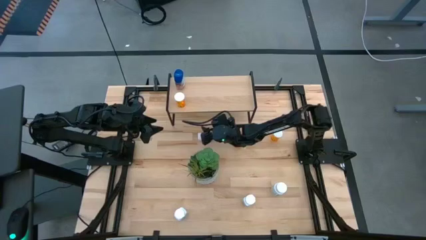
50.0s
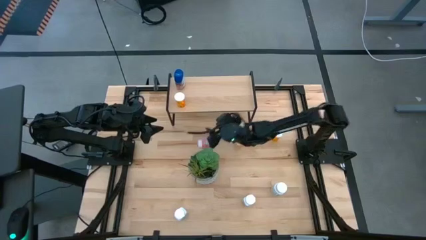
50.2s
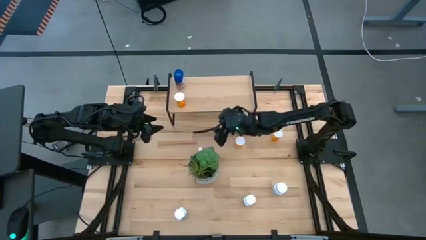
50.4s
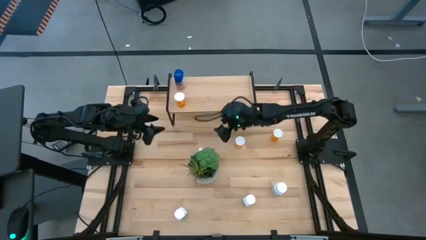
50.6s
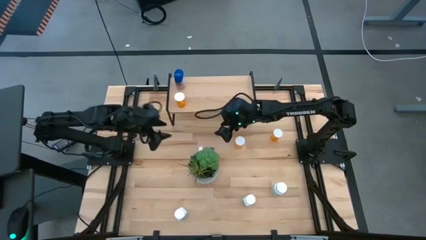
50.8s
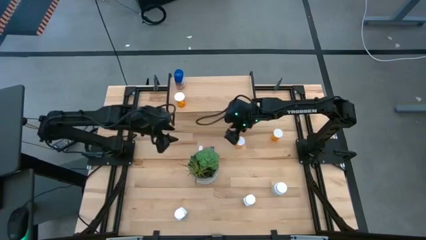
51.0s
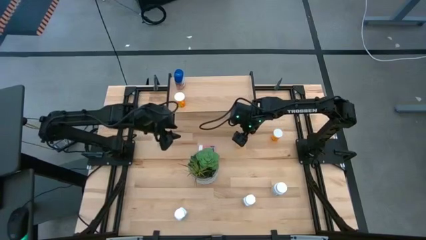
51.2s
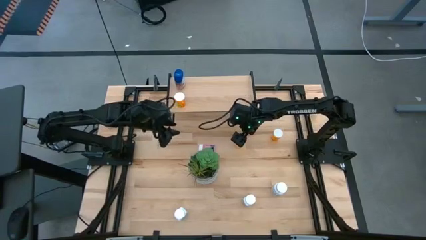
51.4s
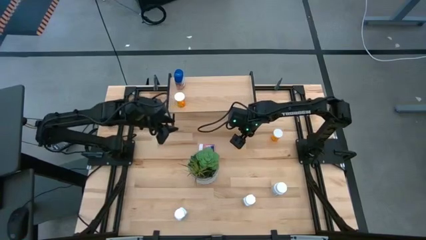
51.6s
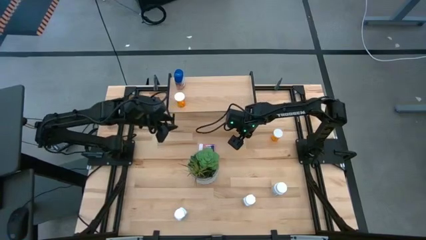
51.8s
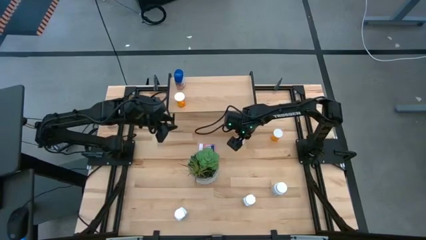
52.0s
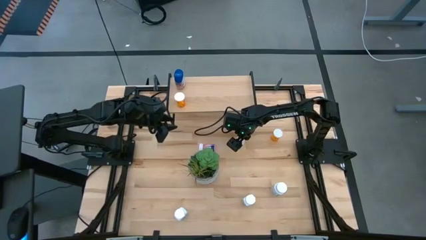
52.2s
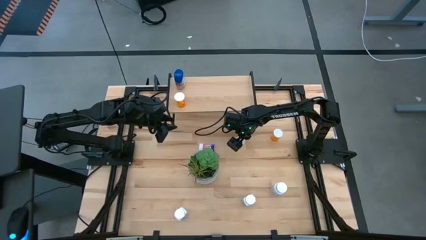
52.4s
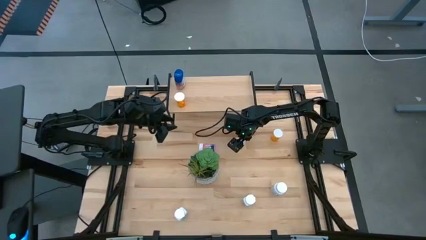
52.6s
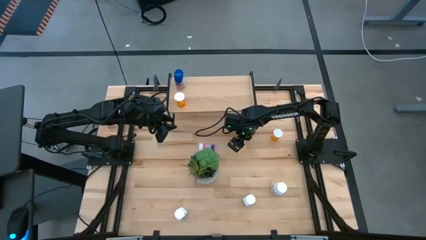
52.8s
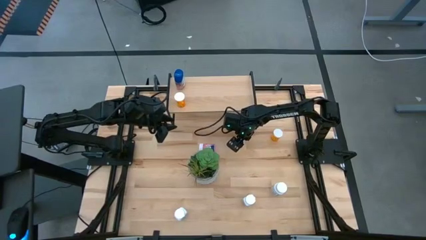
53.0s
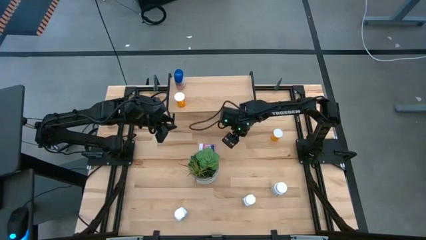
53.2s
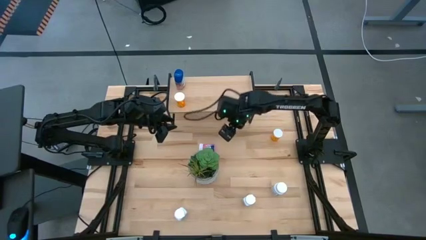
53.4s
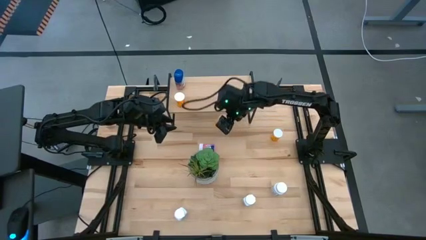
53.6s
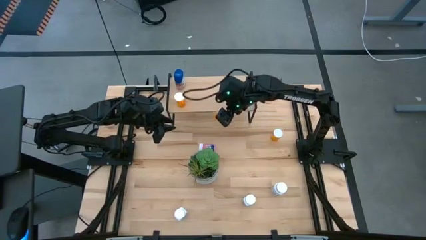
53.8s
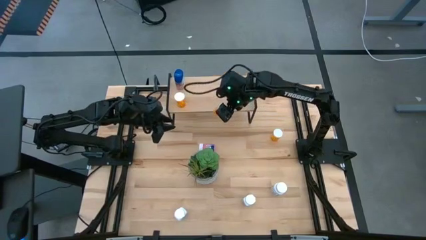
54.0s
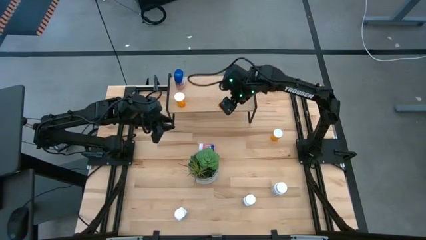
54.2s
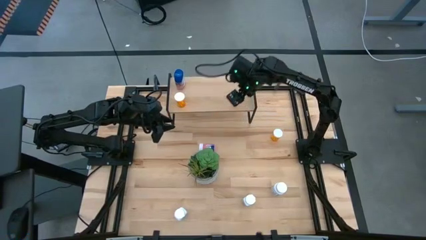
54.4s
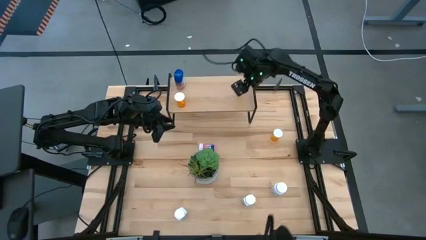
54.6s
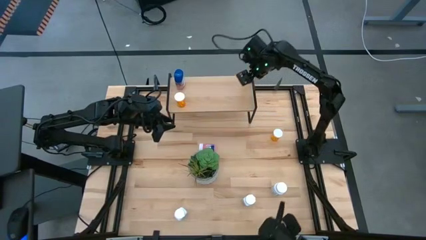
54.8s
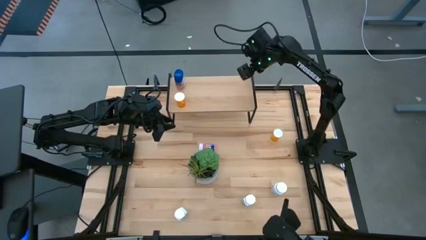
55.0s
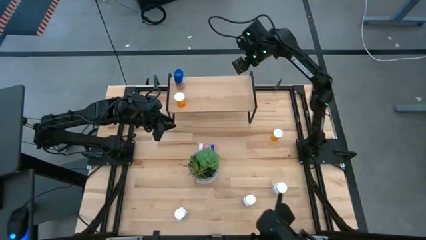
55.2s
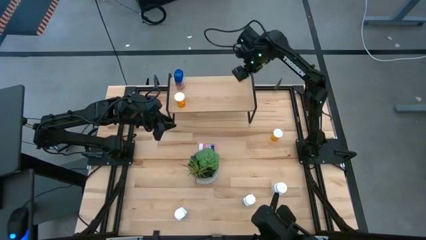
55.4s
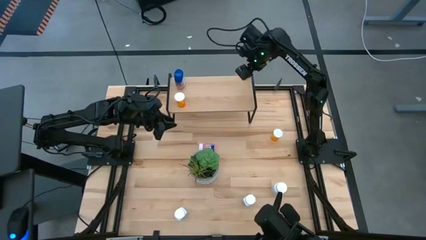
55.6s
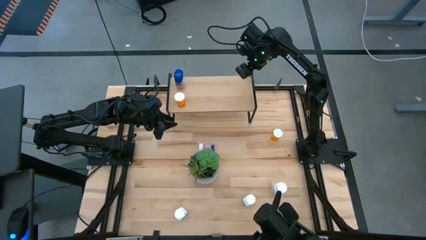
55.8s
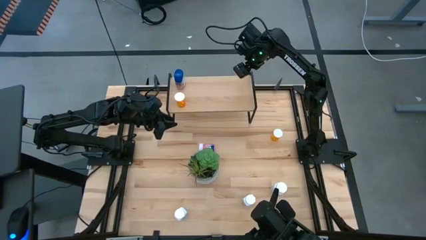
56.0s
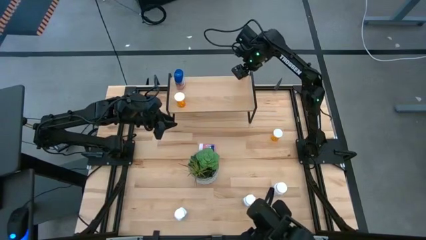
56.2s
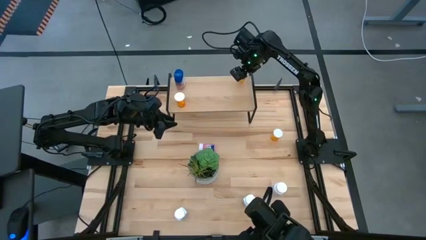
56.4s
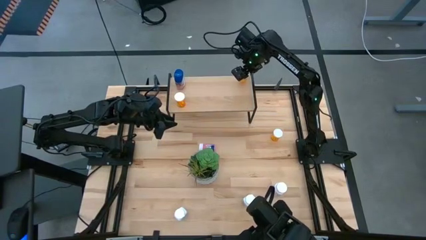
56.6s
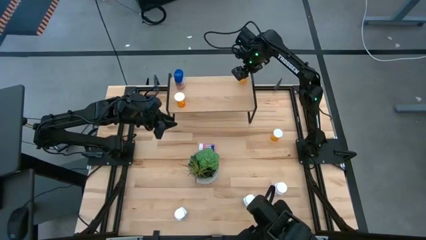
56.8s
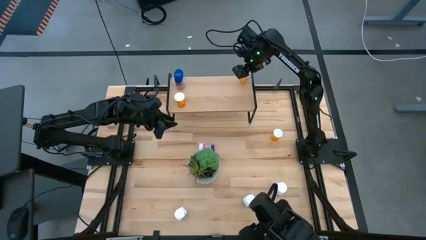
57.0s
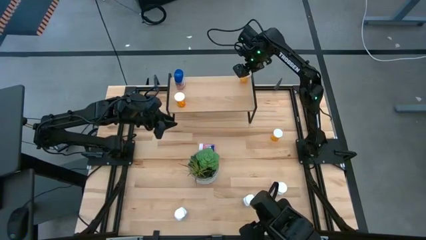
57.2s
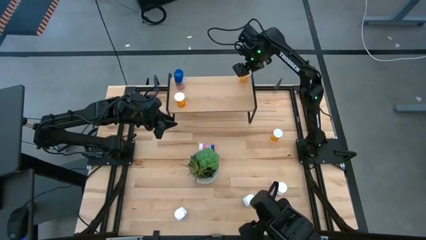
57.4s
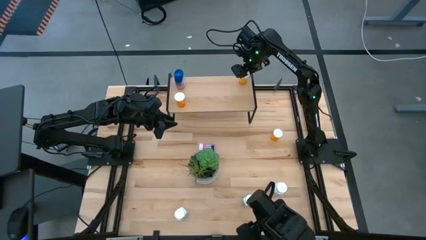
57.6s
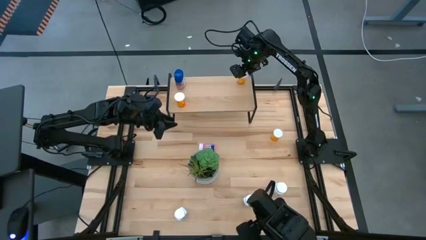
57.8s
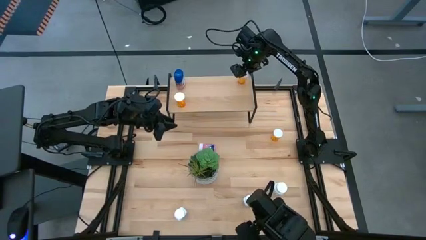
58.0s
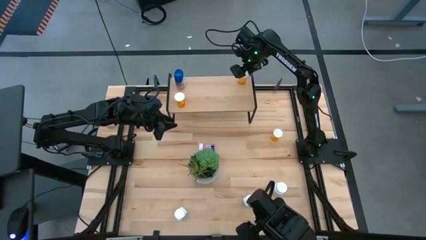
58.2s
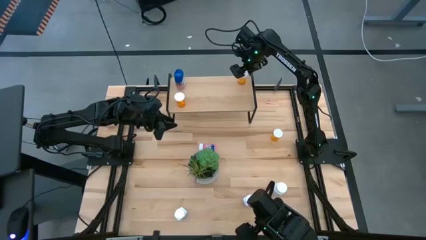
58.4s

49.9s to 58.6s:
Task: Pick and place medicine bottles onto shelf by color
Put the bottom orange pill bottle on the shelf
